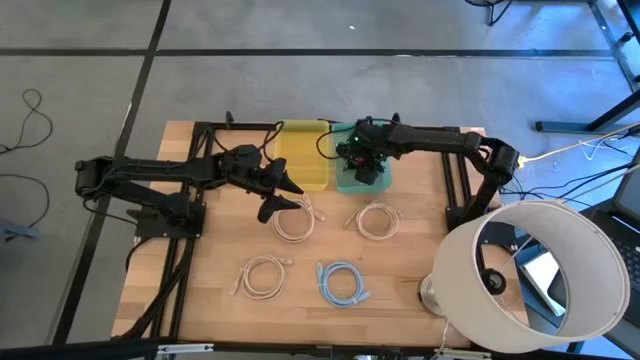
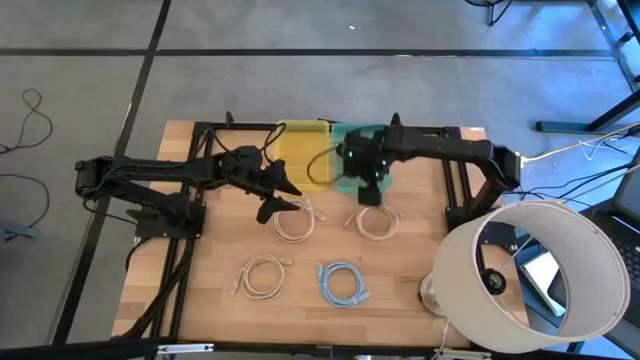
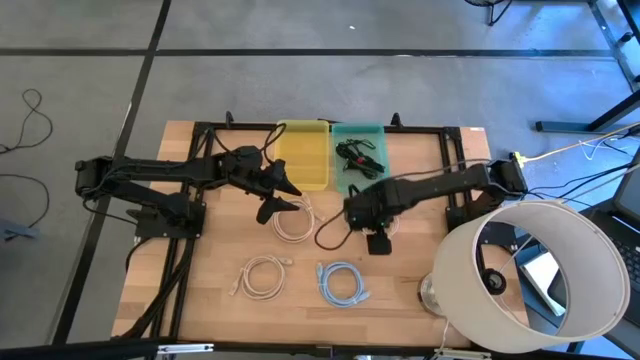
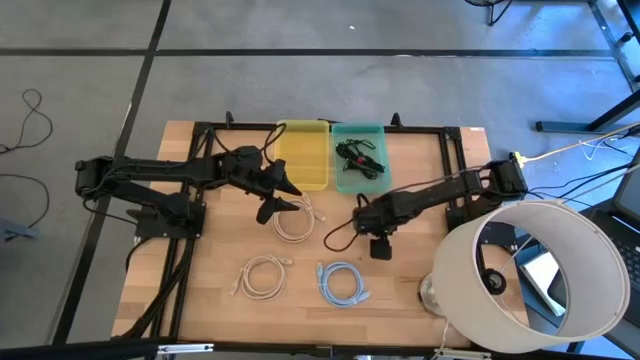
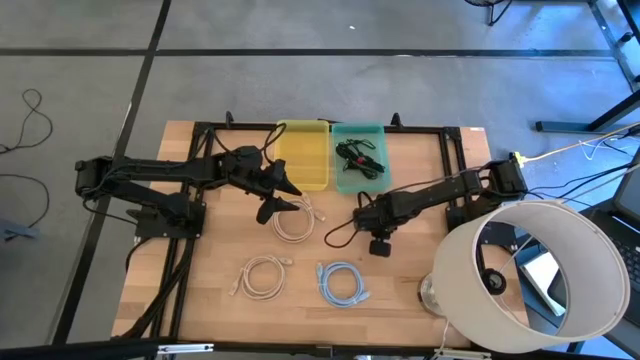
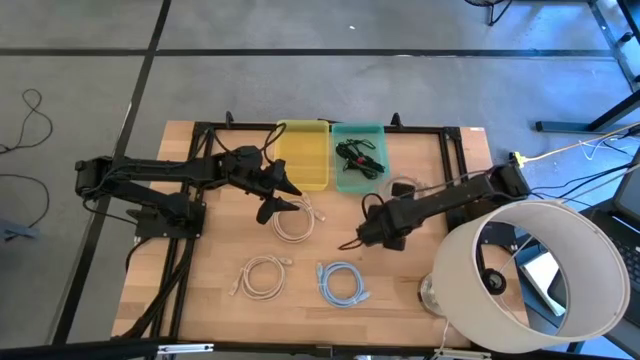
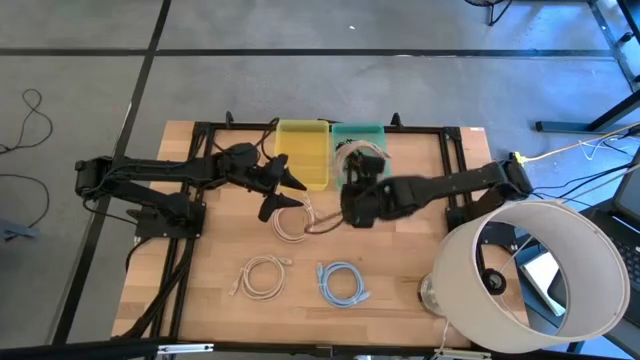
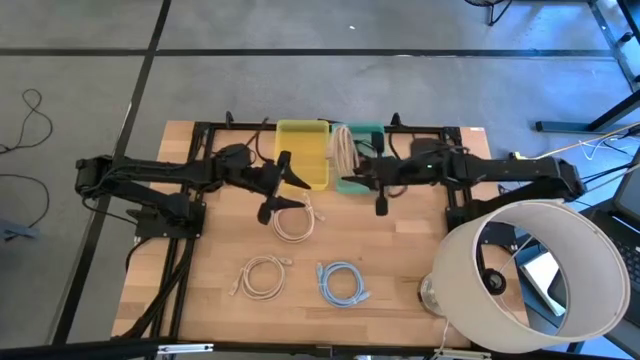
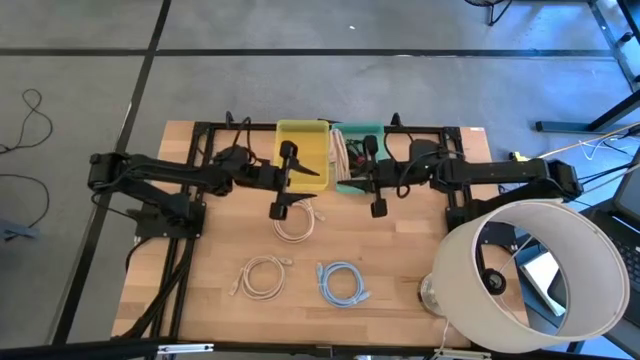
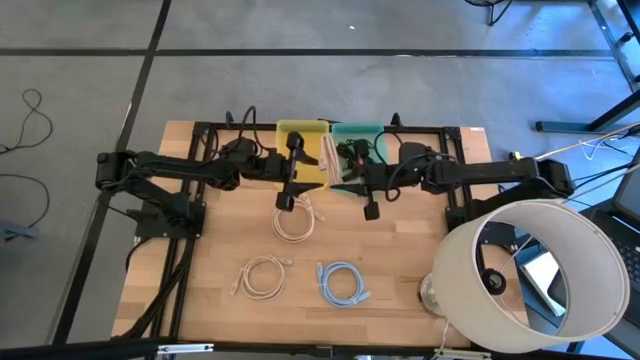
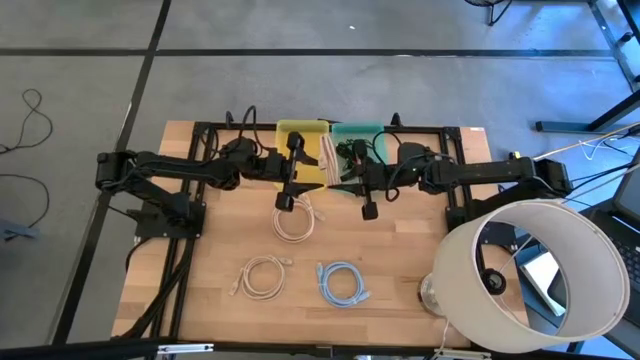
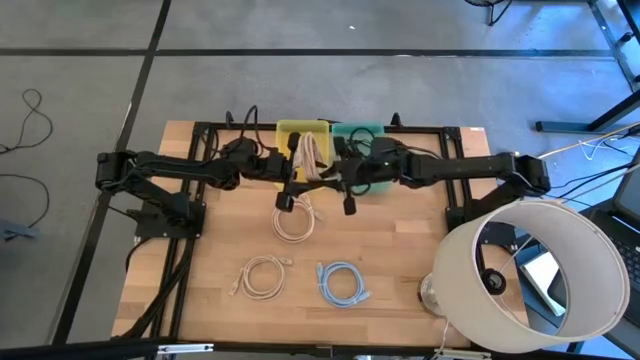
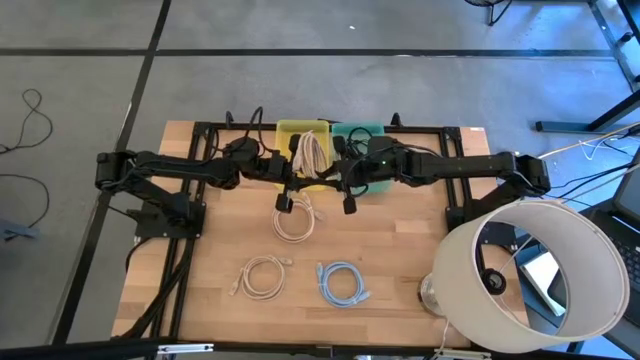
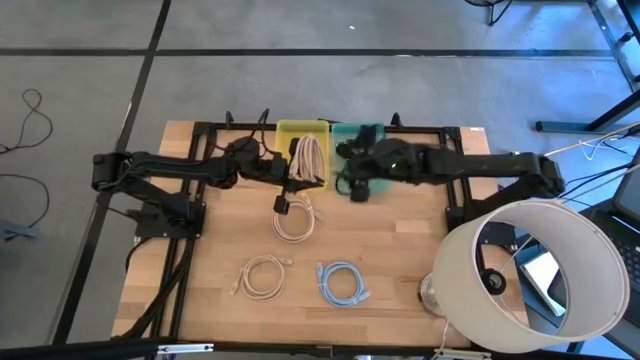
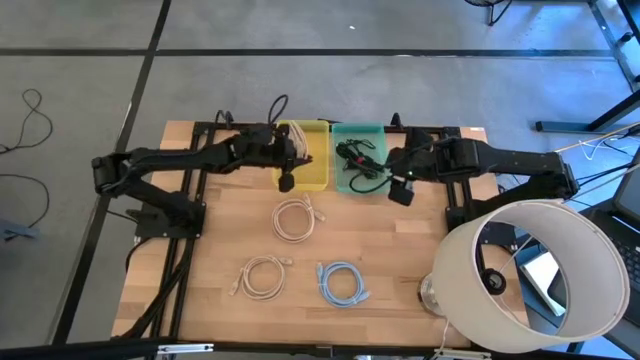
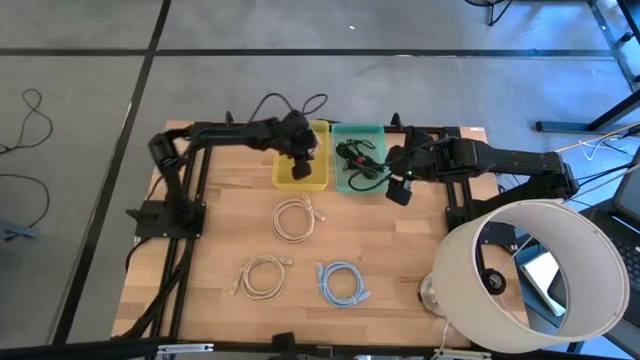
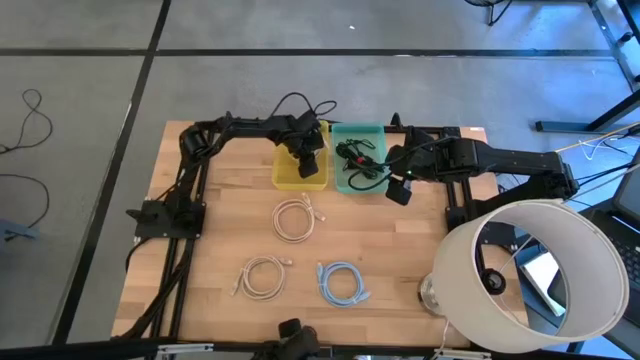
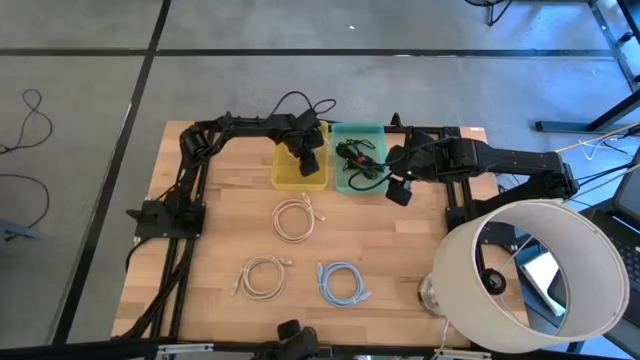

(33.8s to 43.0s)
Put the light brown HDMI cable into the yellow bin

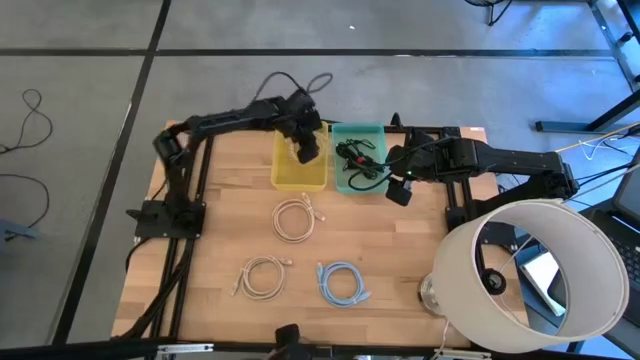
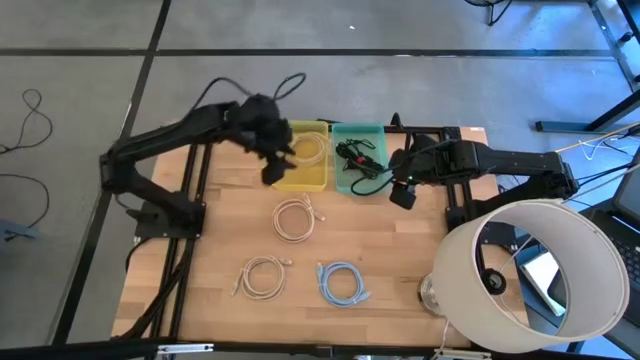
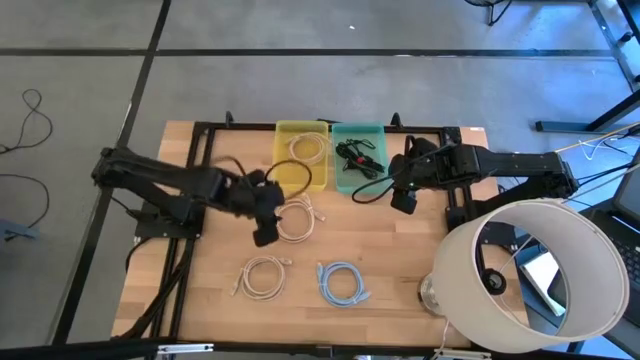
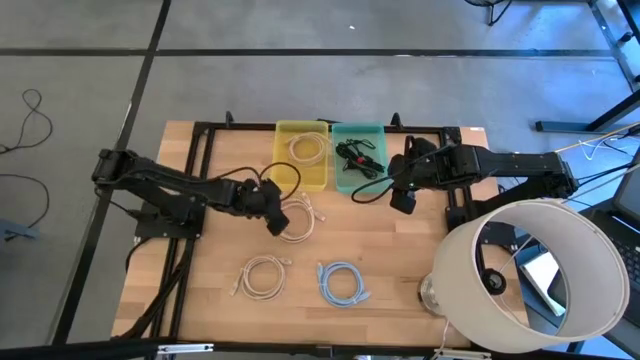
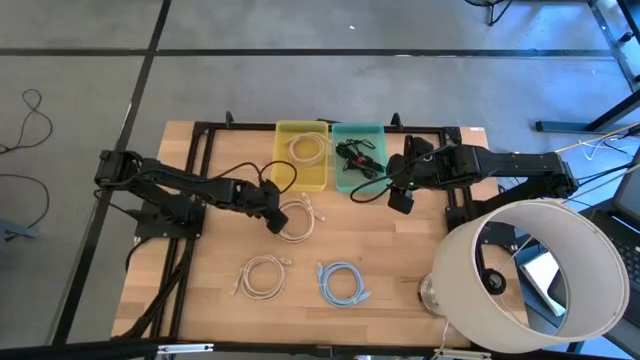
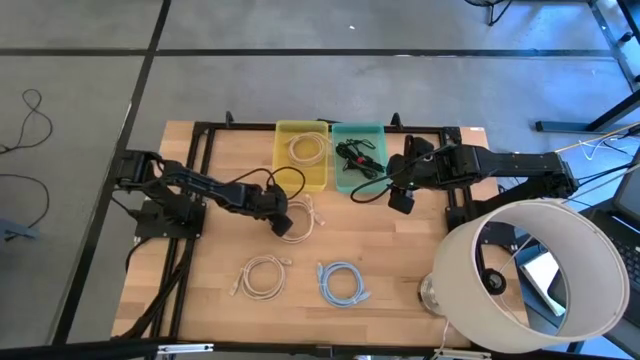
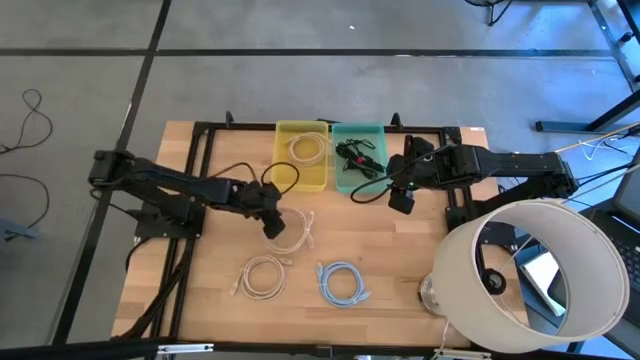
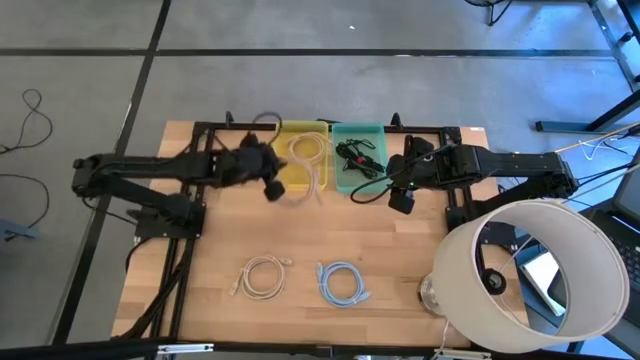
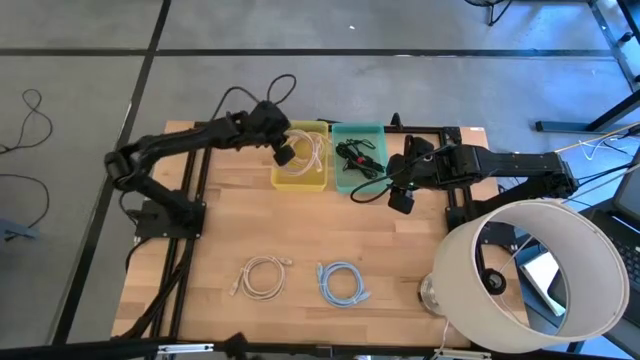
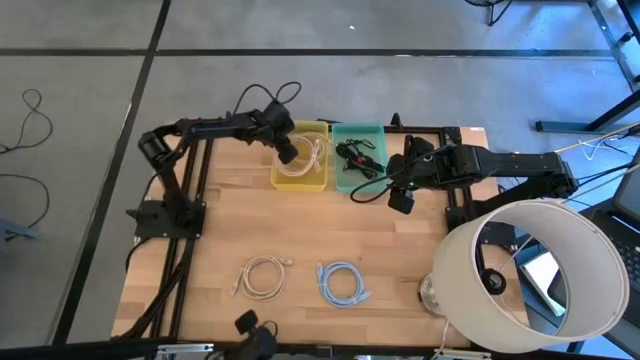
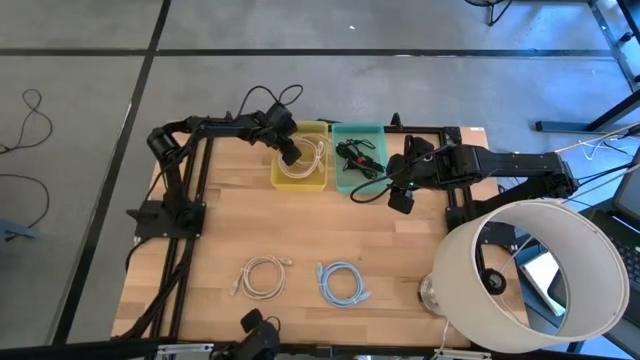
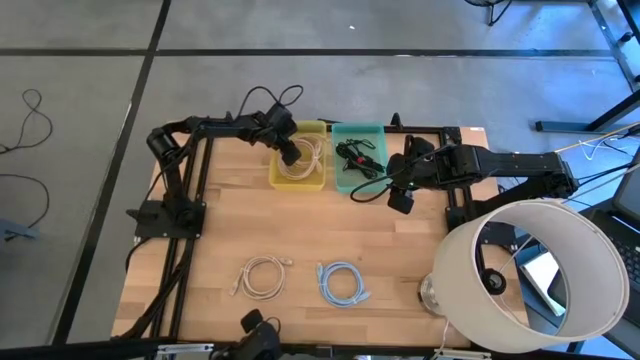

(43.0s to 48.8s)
Put the light brown HDMI cable into the yellow bin

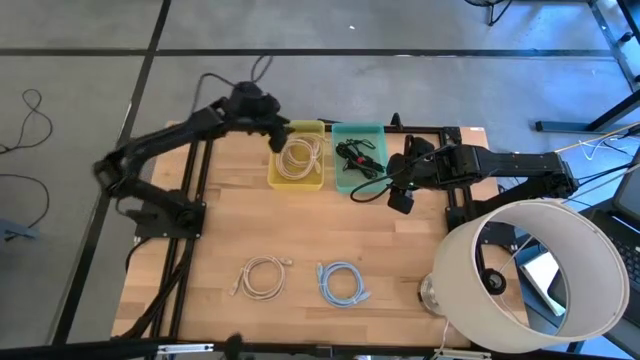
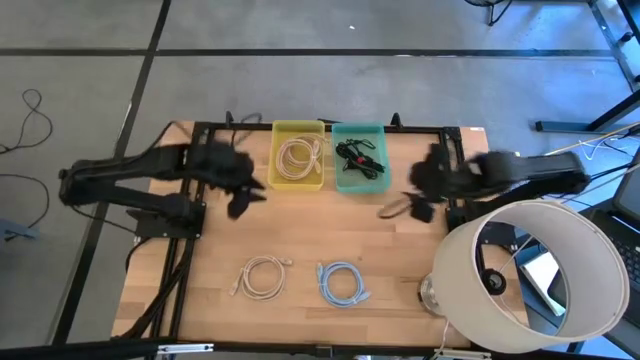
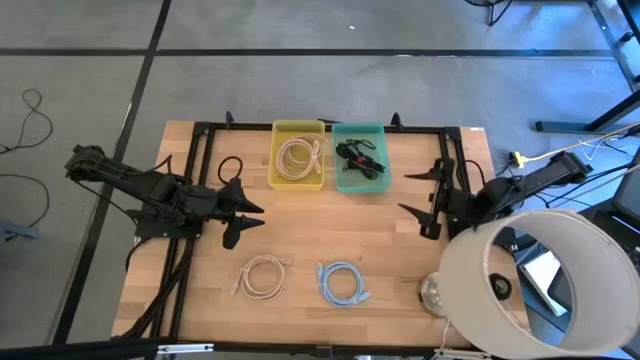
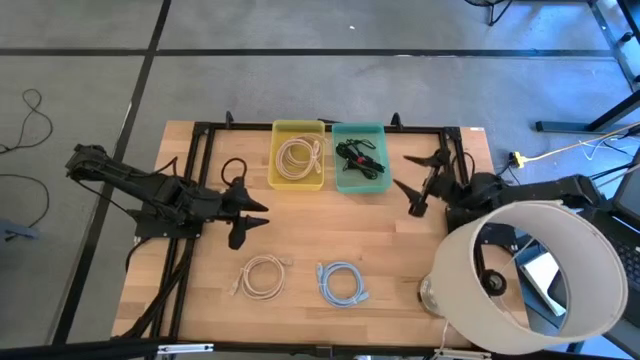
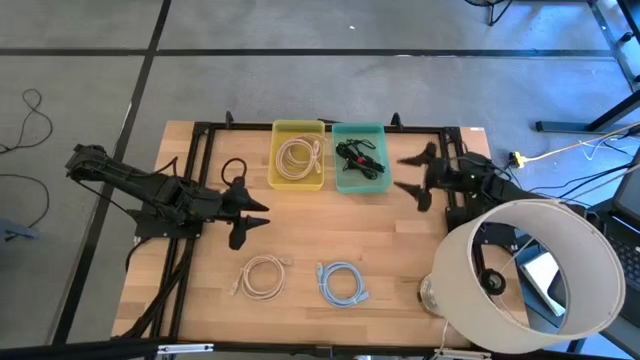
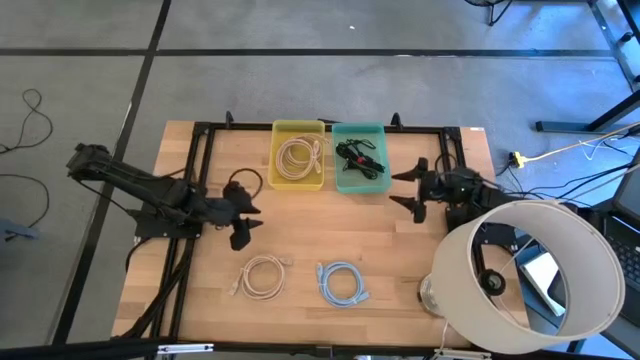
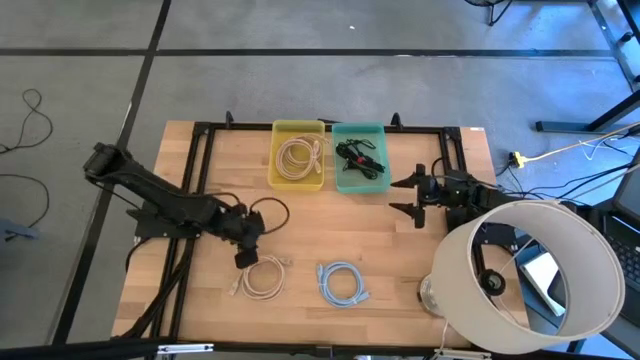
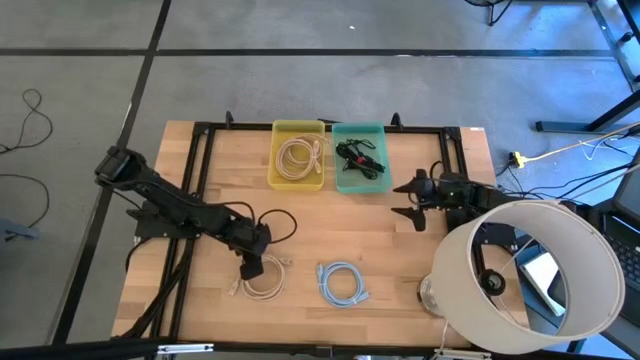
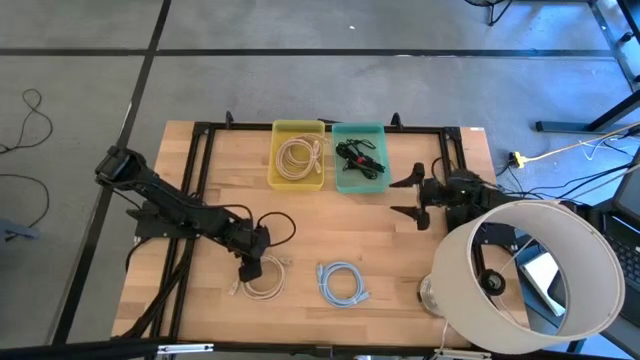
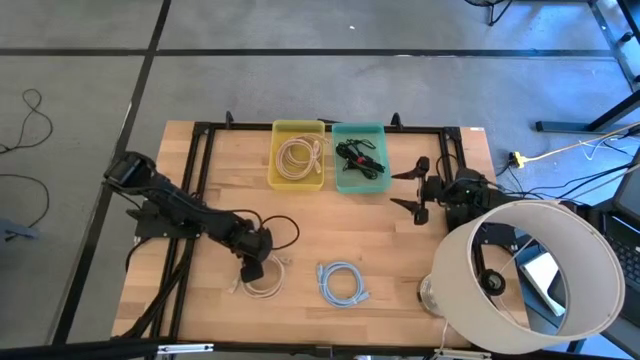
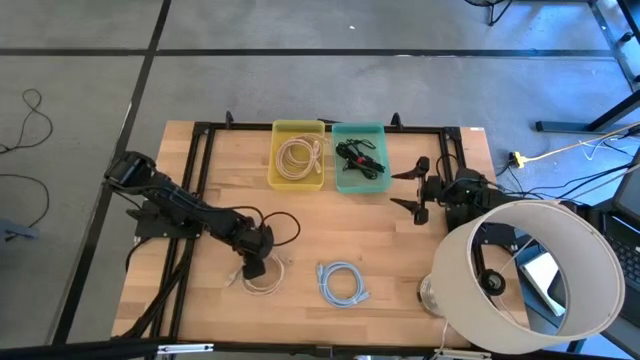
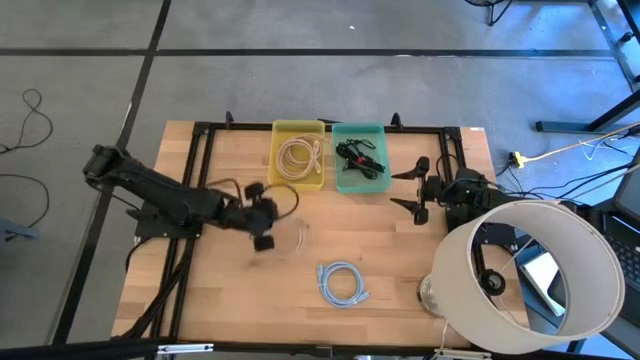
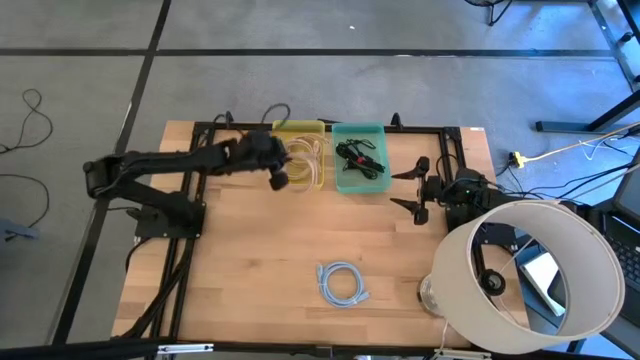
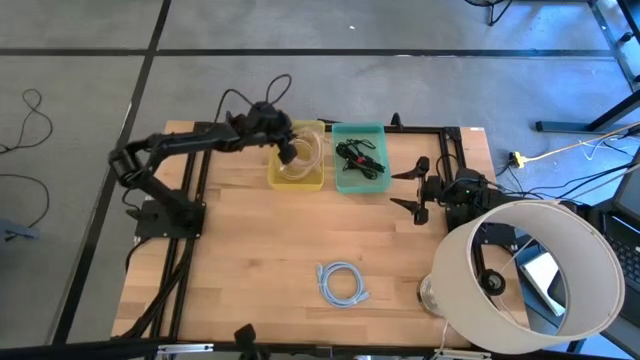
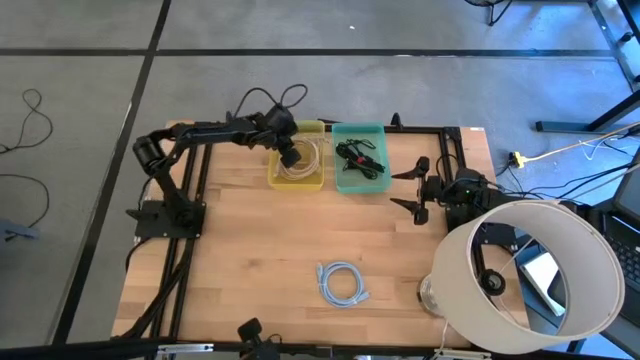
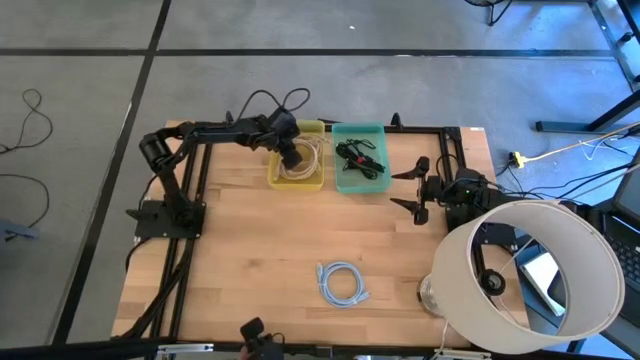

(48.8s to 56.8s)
Put the light brown HDMI cable into the yellow bin
